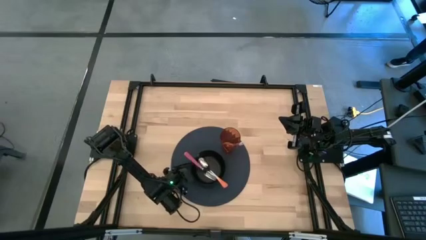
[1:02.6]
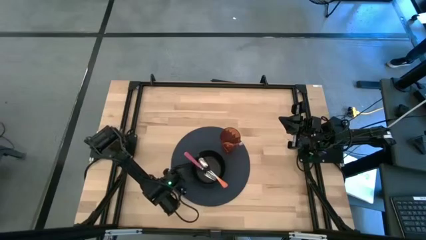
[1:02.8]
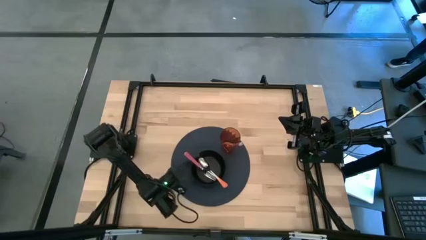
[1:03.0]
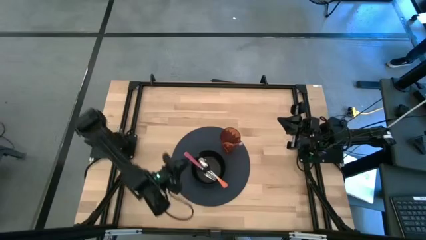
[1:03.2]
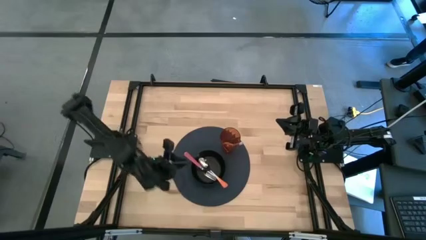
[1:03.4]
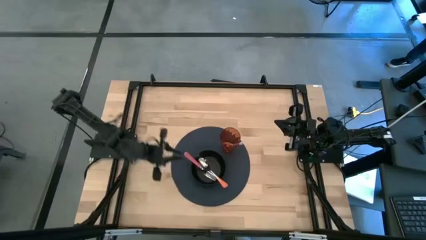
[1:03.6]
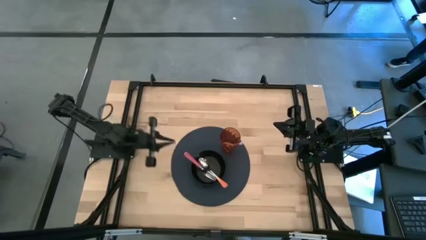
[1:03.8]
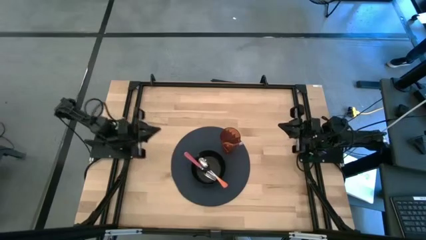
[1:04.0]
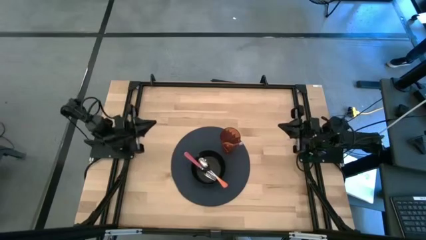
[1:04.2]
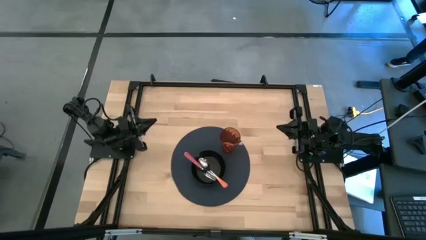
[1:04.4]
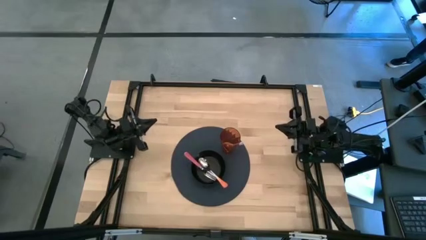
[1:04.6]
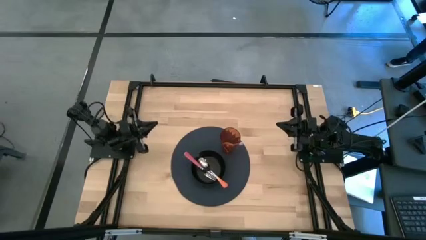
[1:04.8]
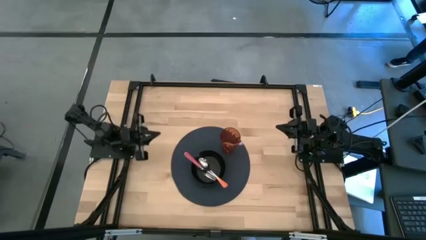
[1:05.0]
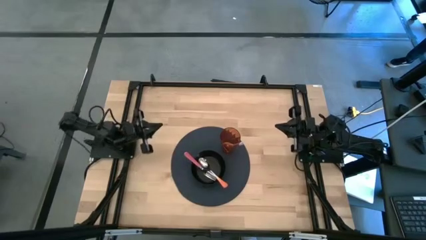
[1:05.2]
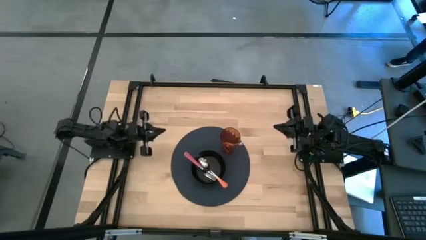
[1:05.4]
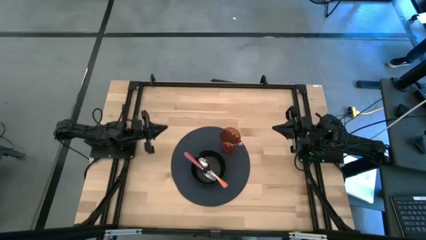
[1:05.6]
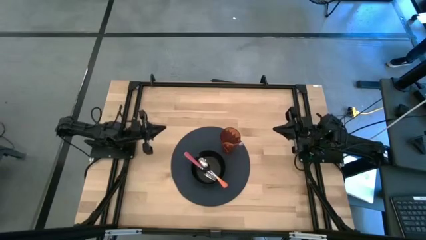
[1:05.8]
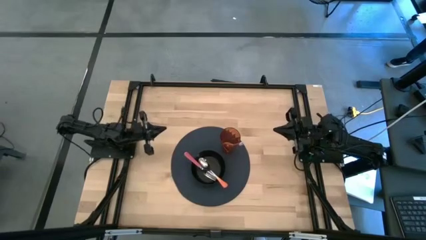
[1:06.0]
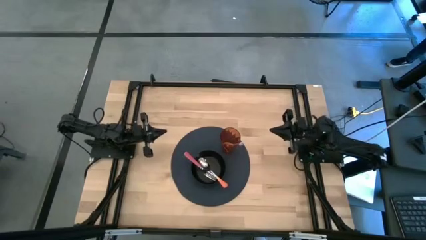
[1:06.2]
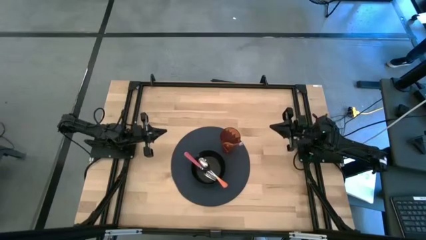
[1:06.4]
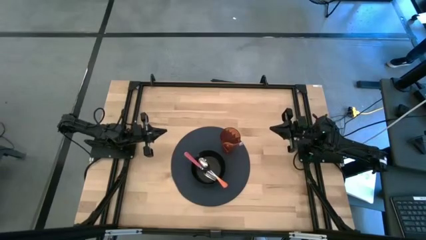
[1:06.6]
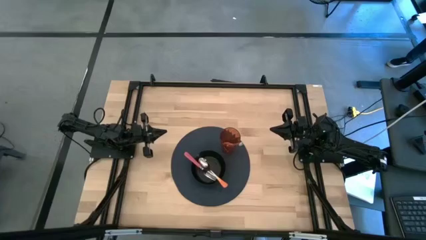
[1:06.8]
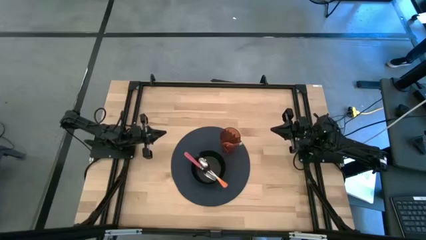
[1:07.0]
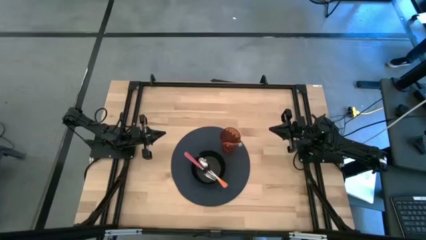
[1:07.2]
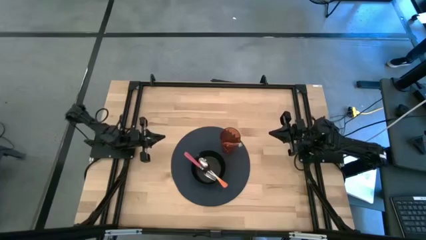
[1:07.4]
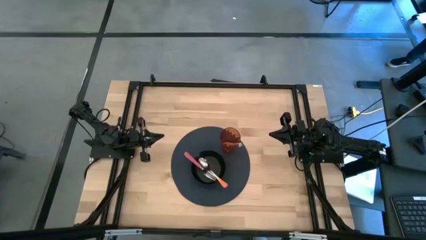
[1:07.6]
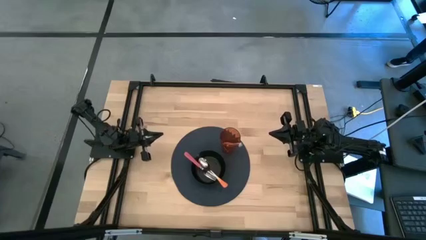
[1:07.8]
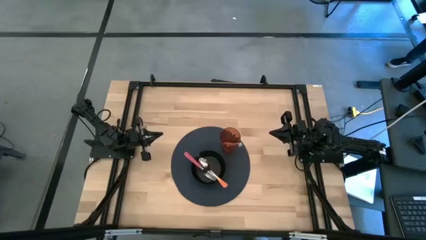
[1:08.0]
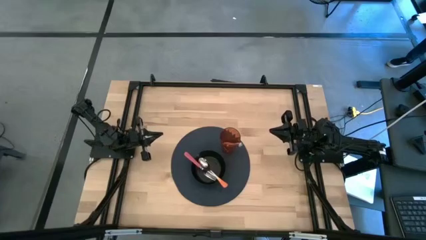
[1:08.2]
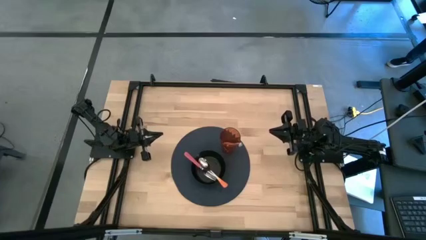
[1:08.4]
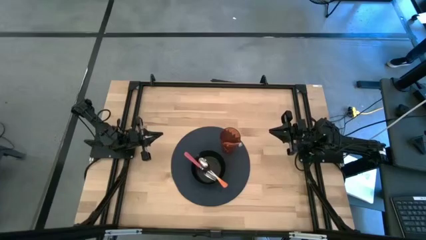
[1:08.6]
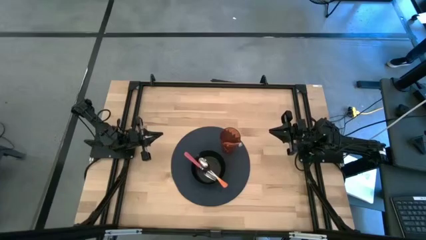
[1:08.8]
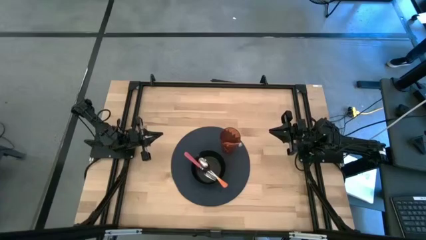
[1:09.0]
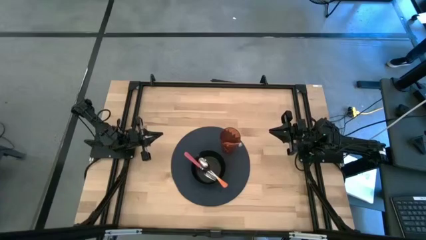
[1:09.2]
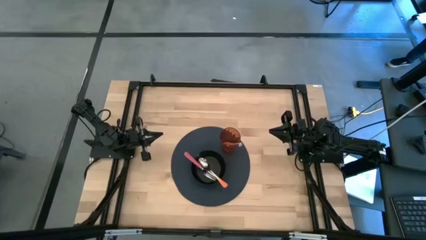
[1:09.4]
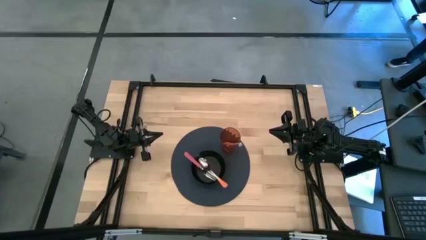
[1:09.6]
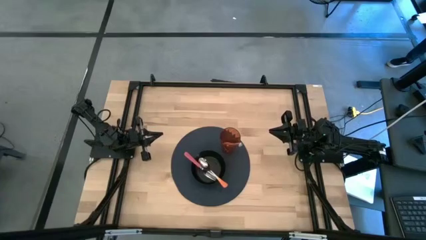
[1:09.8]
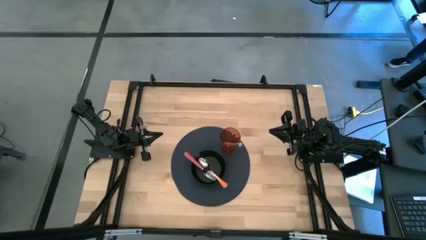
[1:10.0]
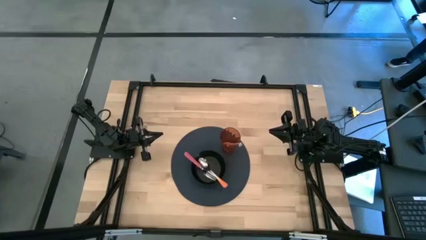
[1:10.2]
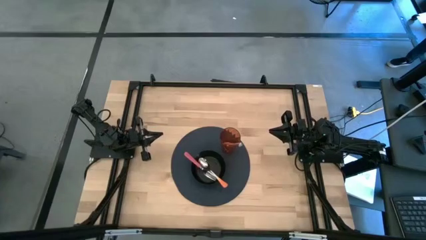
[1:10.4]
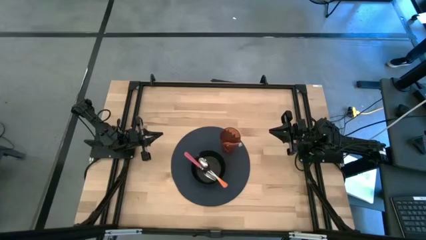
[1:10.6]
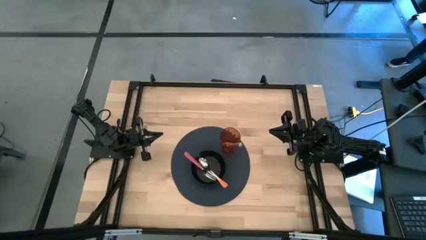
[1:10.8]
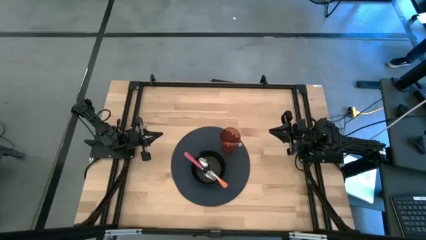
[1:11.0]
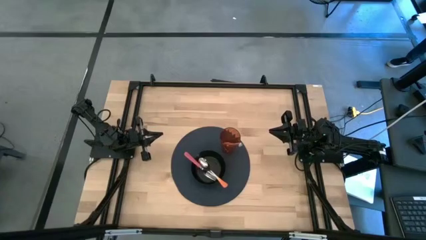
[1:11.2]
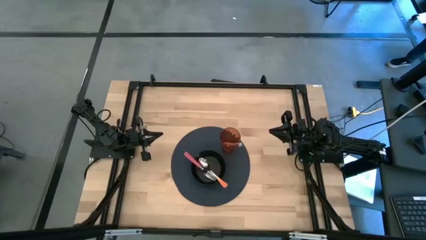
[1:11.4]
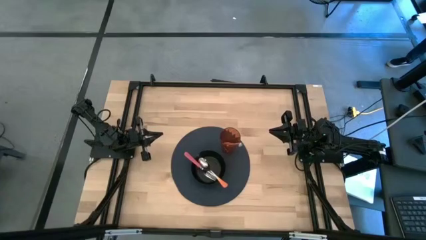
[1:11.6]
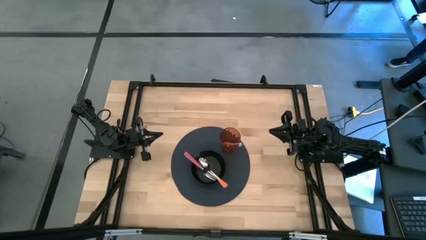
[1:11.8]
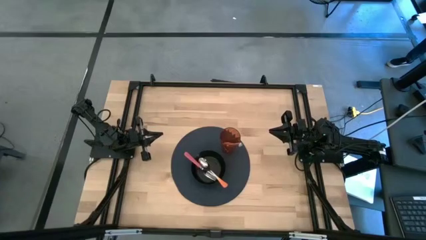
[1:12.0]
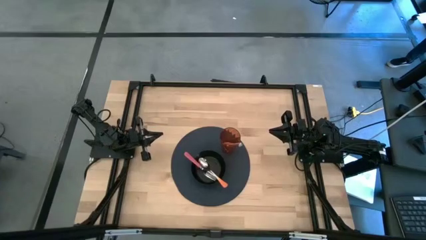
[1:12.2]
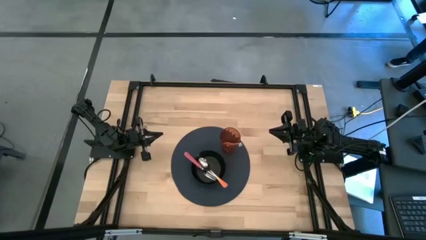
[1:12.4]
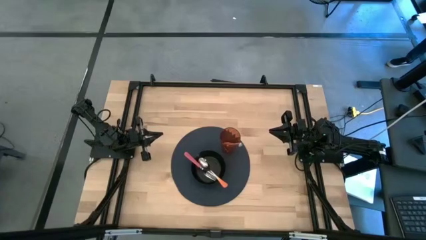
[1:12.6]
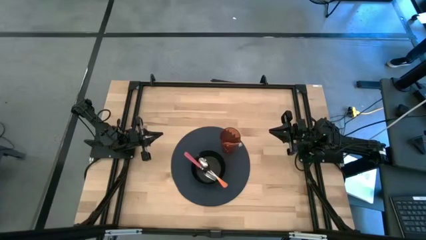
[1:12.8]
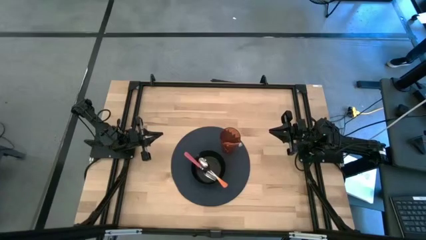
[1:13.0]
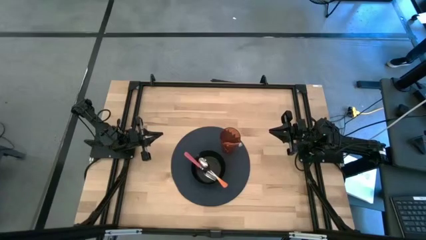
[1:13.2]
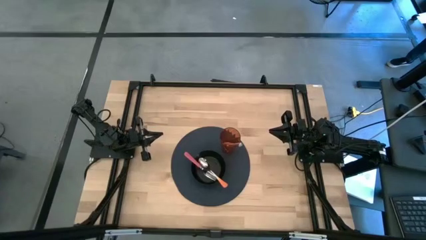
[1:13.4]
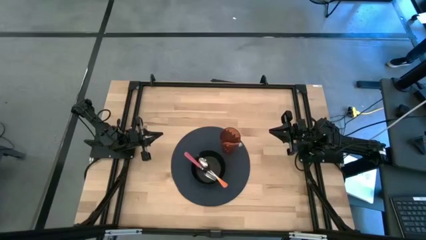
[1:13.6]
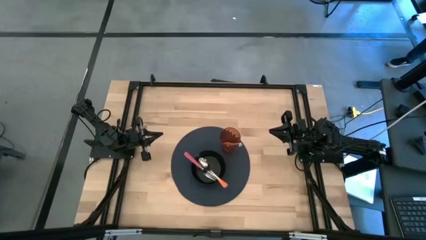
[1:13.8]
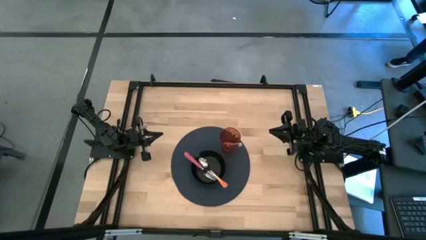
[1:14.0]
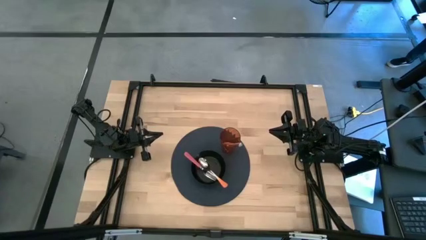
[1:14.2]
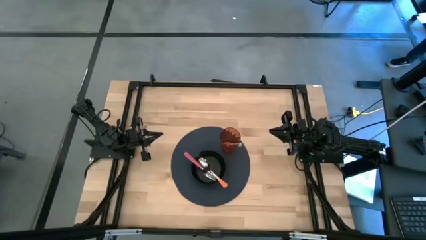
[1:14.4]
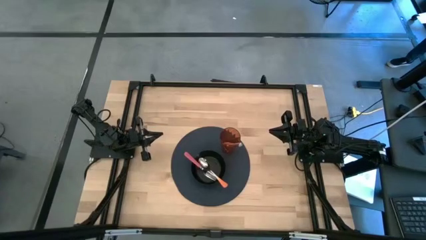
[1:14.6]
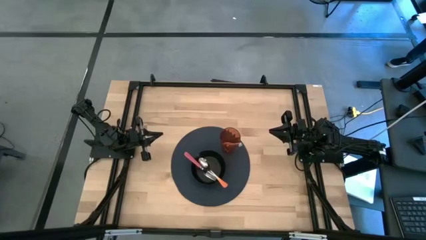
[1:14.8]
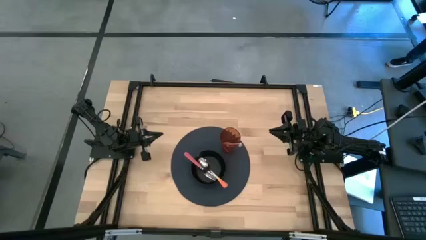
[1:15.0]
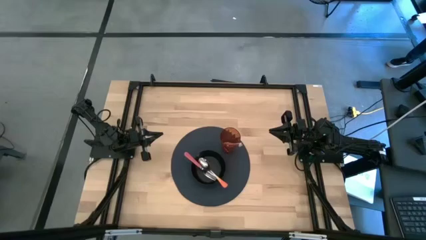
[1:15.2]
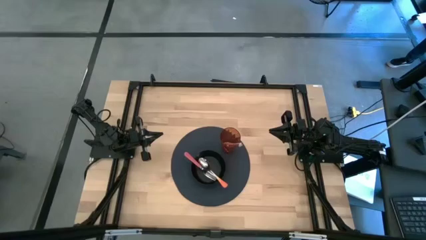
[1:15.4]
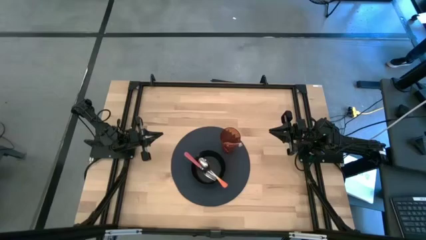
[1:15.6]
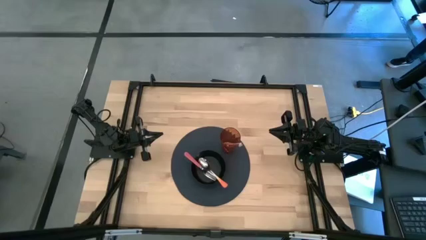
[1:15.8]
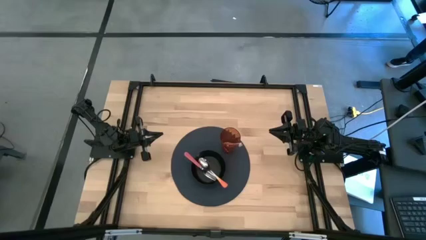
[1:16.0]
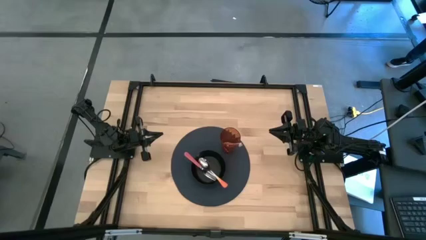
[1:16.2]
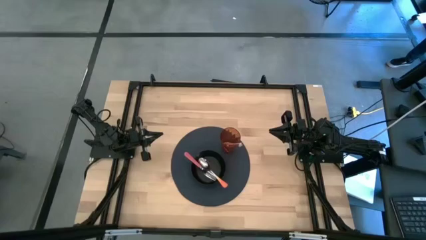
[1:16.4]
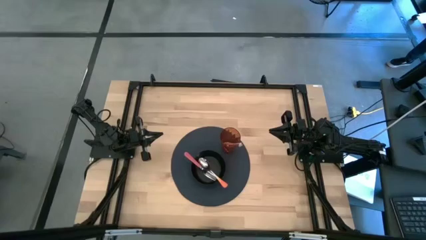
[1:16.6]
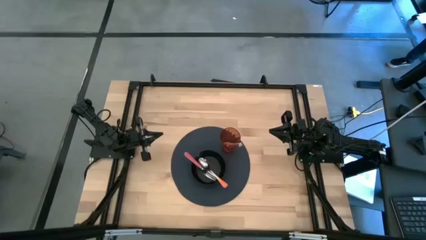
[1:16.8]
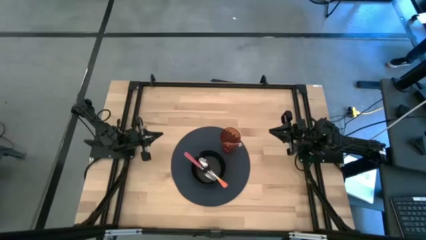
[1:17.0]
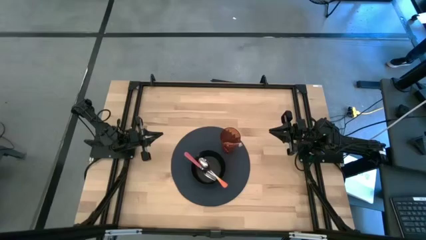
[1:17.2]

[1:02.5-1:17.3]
Task: Pick & Place Utensil
Return to Home Position

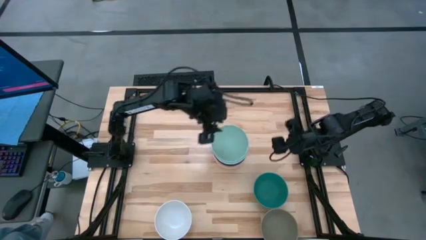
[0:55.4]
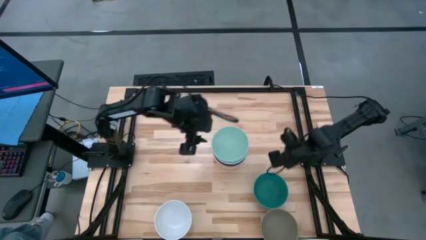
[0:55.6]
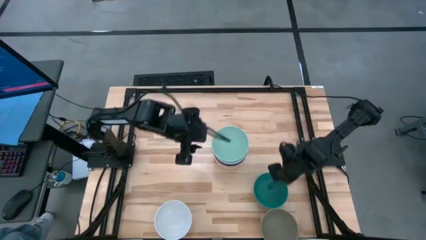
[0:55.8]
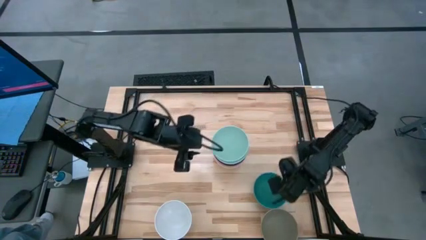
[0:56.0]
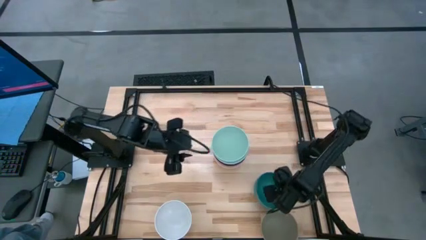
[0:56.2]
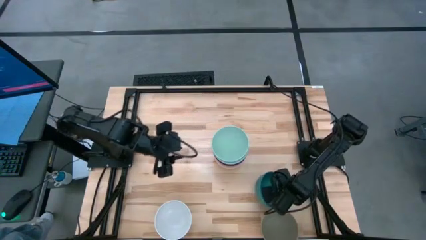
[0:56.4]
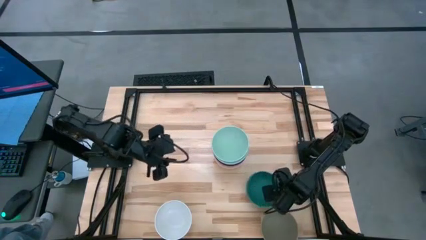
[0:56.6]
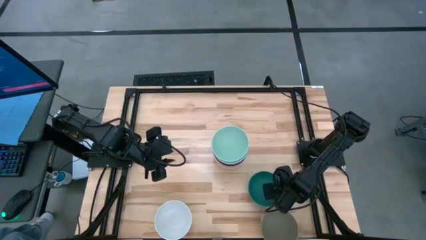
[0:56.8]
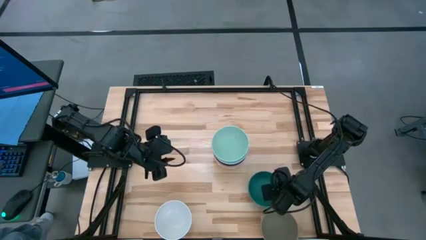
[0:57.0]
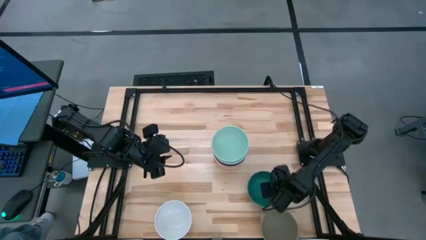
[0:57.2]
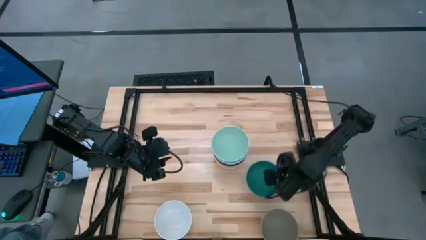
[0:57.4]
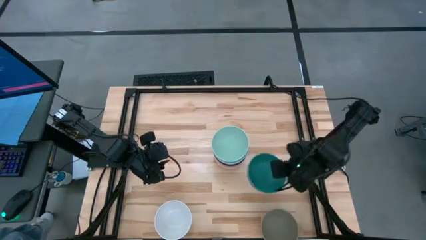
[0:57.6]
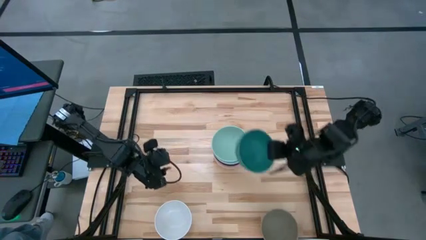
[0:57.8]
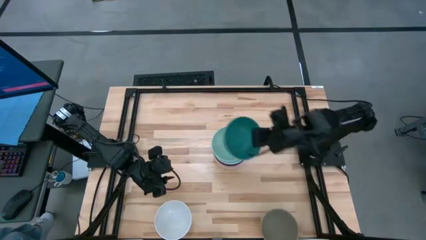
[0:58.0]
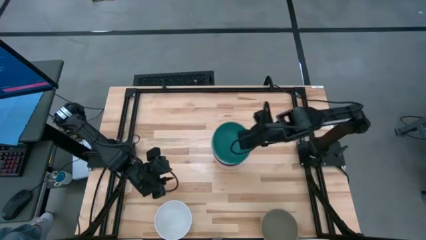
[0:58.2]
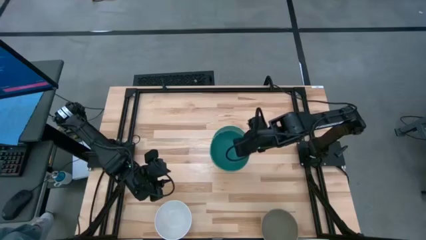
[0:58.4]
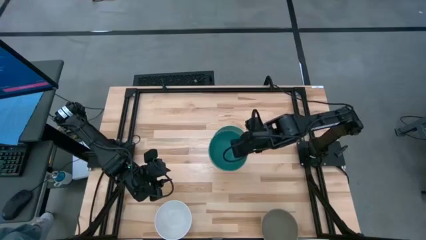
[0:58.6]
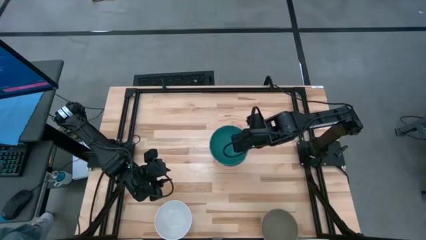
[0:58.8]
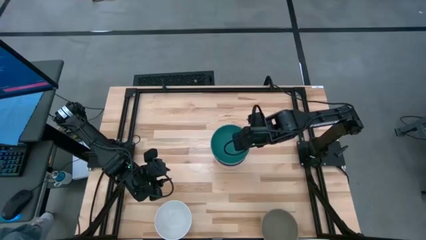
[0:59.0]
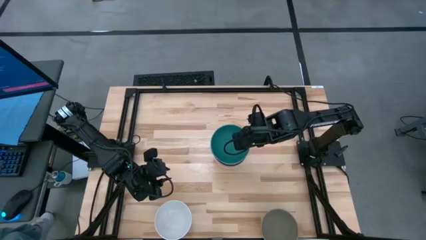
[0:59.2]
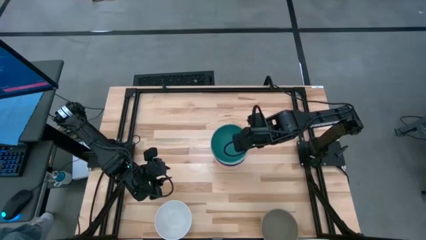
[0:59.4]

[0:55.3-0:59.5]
Task: Nest bowls inside each other
Stack the green bowl on the light green bowl
